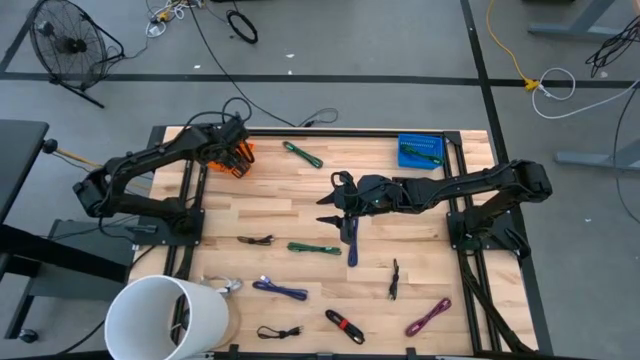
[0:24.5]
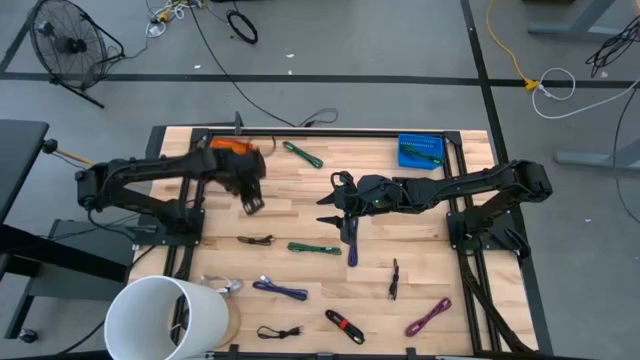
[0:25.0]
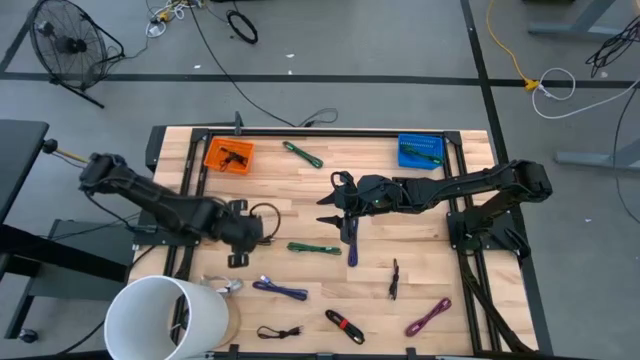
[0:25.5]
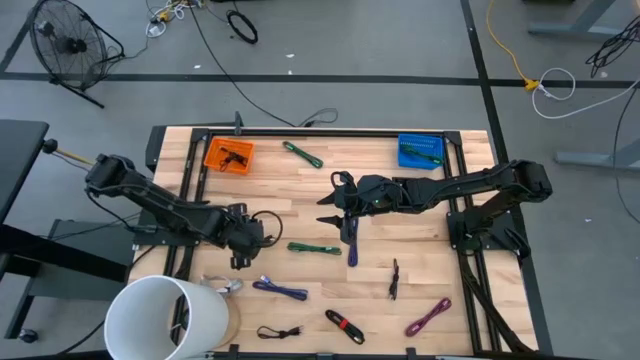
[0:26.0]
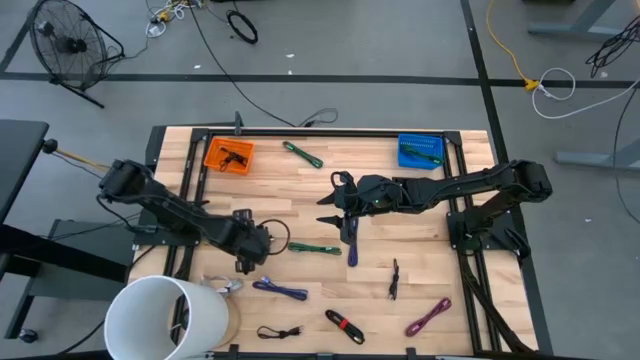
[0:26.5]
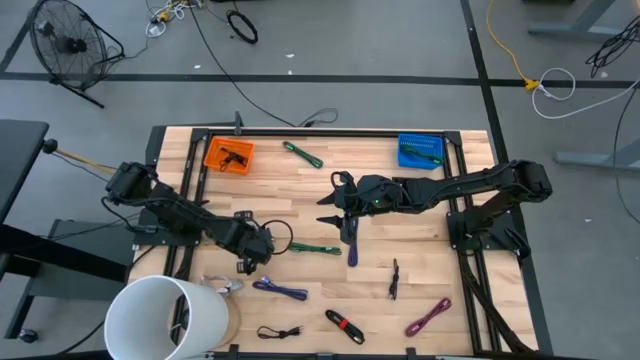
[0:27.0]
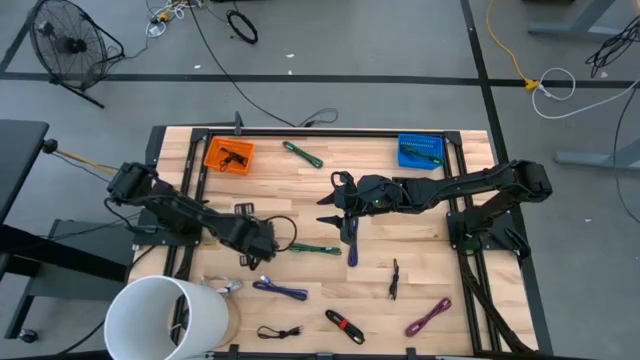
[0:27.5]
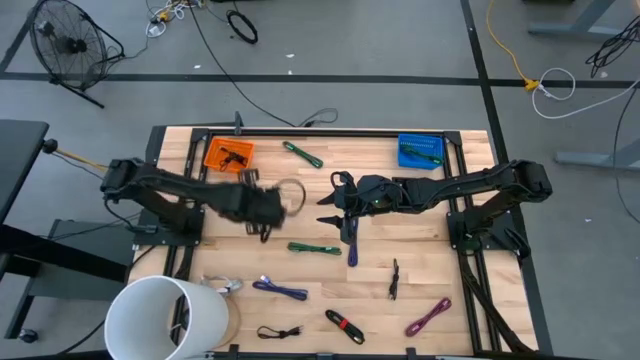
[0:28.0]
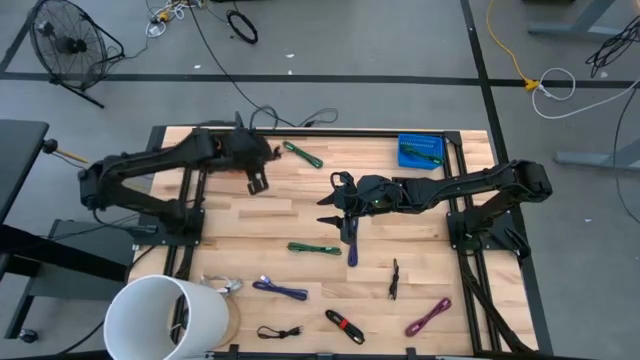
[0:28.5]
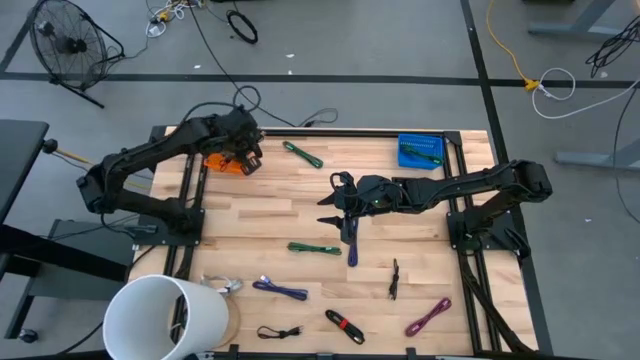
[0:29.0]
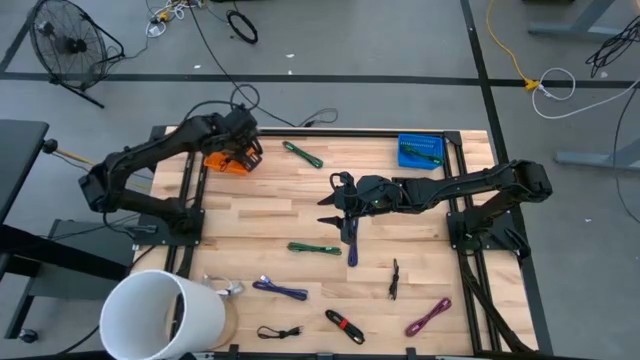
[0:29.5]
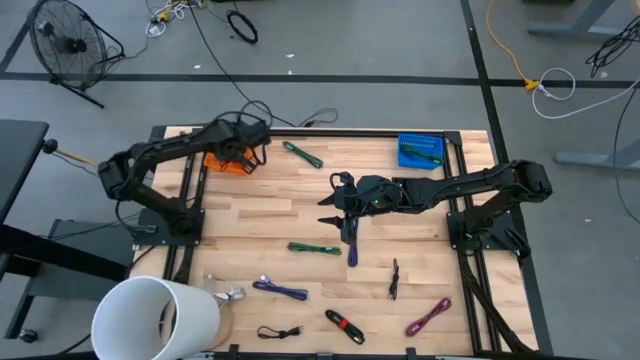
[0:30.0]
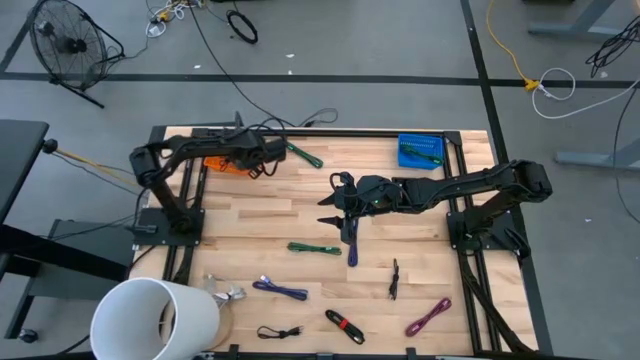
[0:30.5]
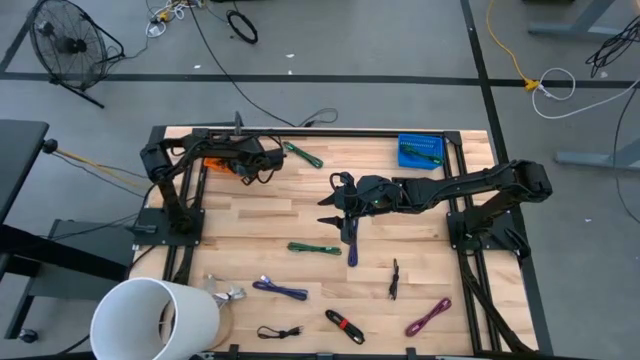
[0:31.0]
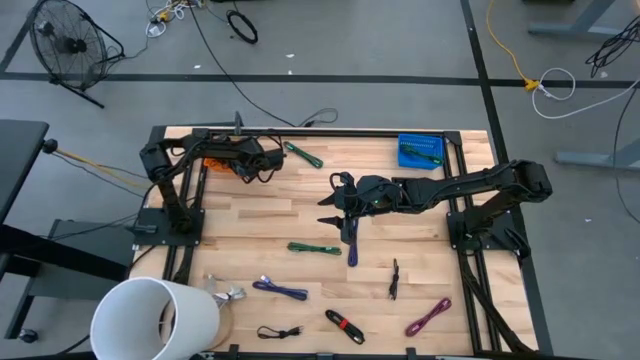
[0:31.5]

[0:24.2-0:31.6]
Task: Pick & Place USB Port
Put the black charger cable into the orange bin

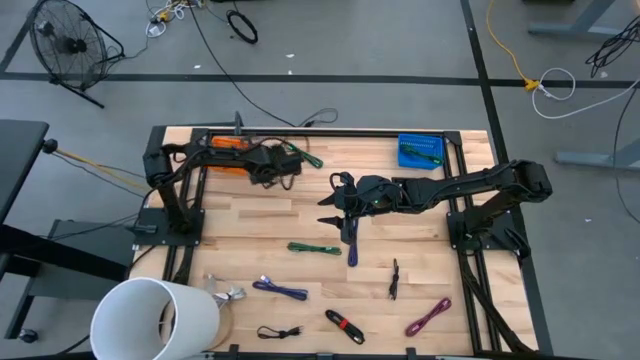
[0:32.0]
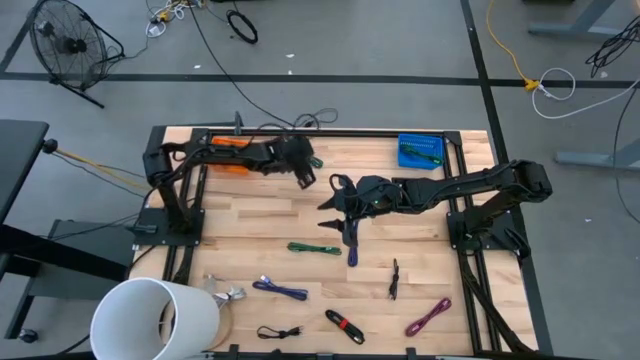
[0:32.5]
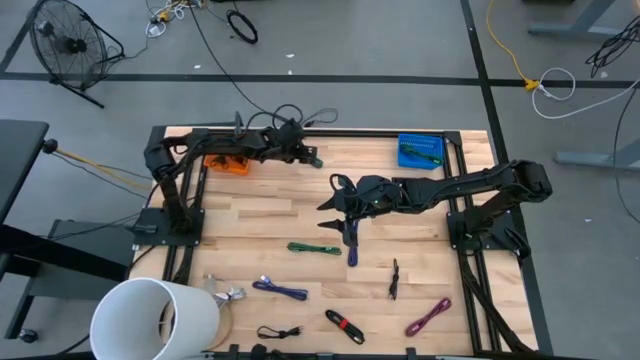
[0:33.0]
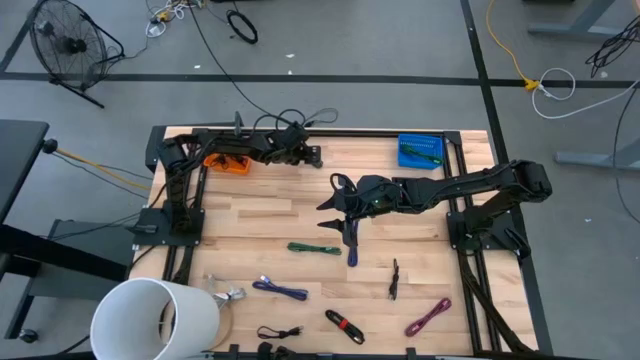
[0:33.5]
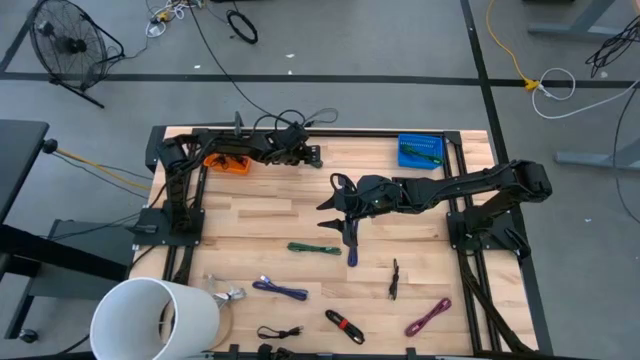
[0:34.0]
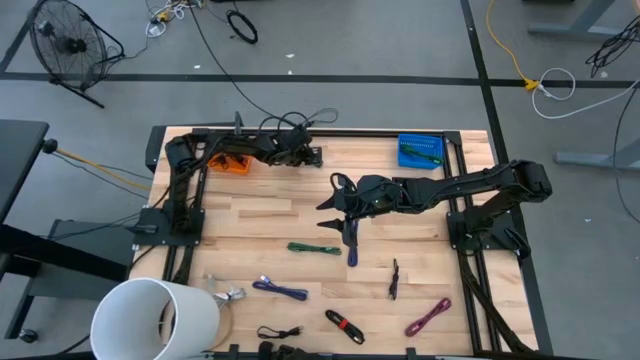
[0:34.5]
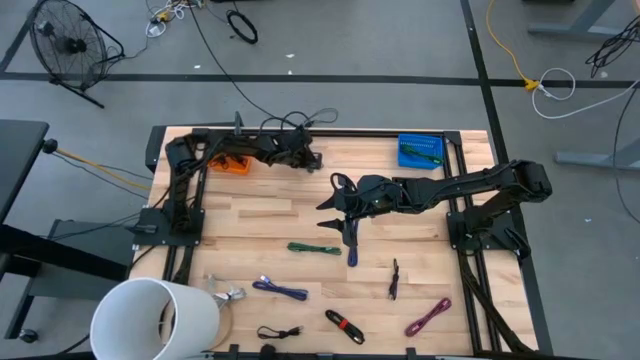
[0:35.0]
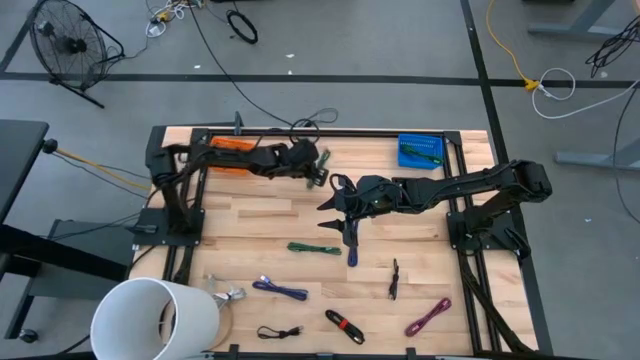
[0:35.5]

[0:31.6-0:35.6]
Put the green charger cable into the blue bin

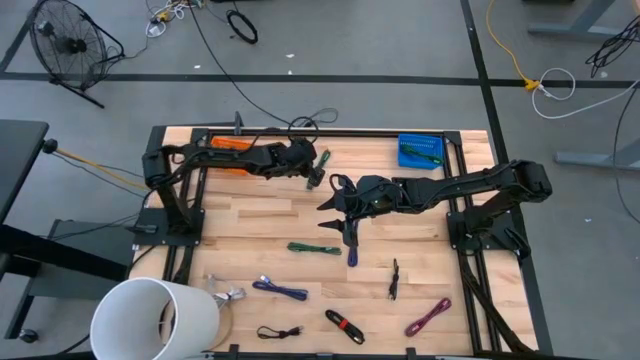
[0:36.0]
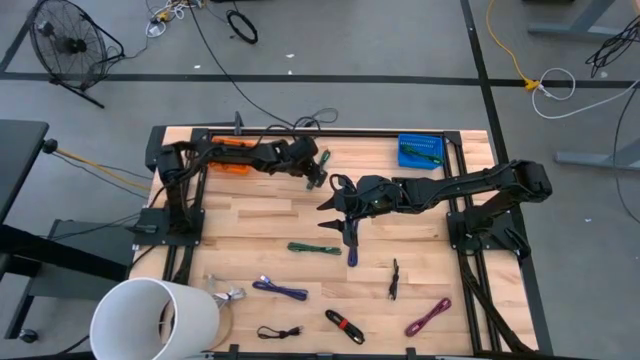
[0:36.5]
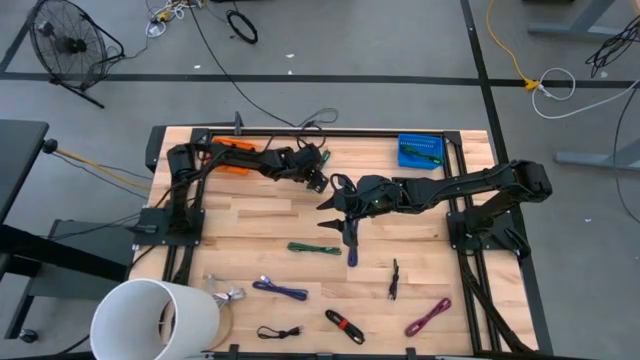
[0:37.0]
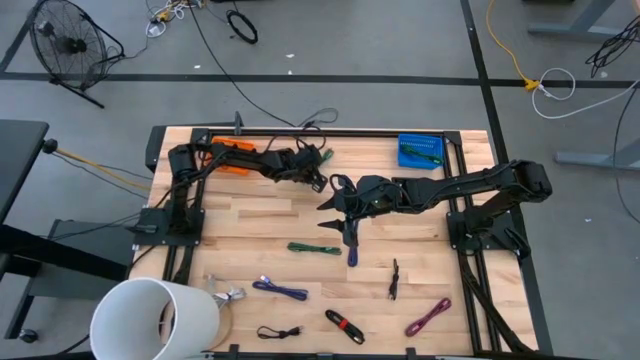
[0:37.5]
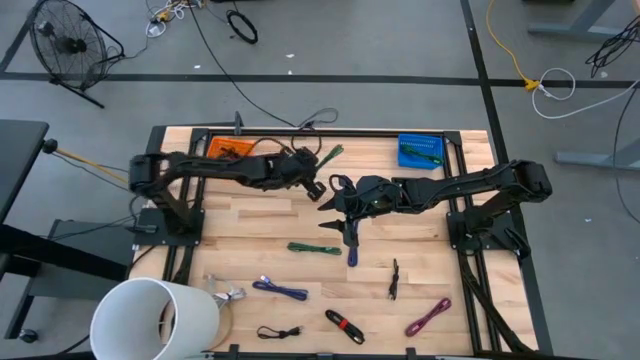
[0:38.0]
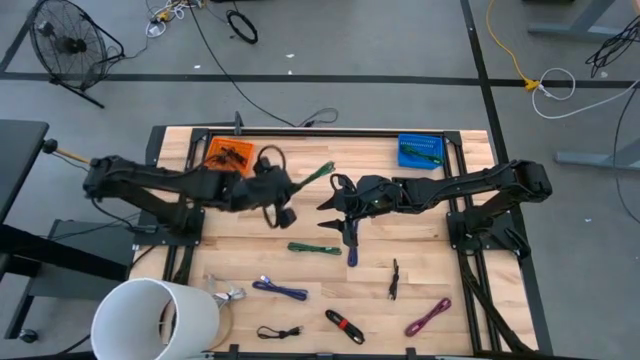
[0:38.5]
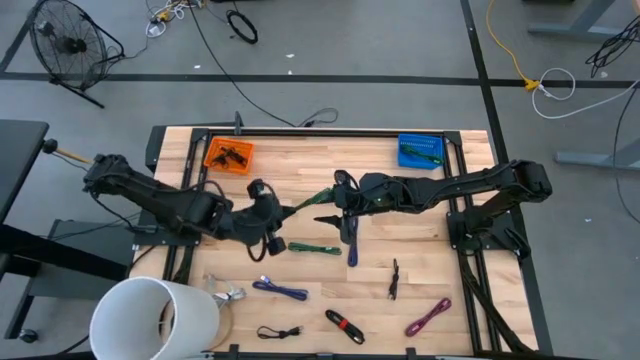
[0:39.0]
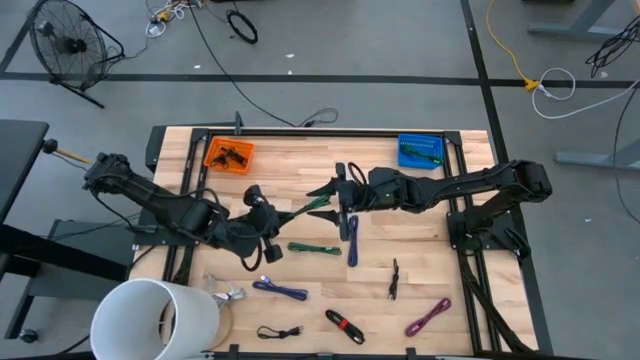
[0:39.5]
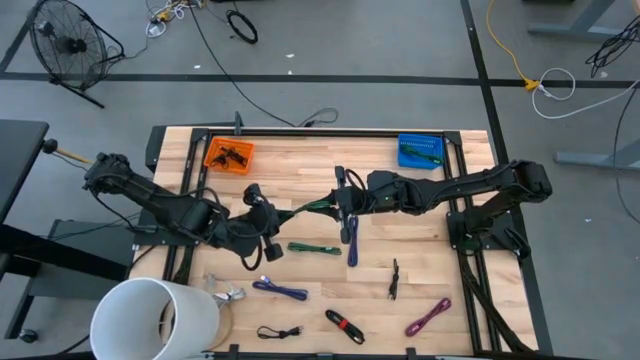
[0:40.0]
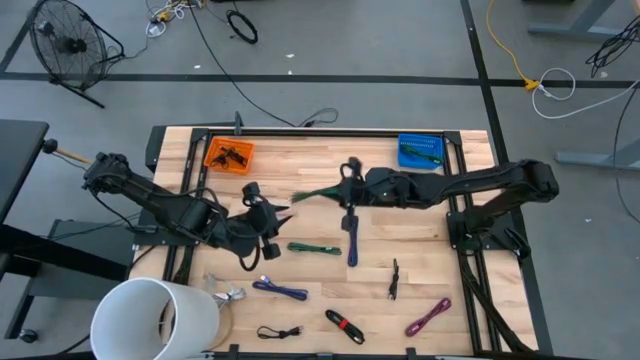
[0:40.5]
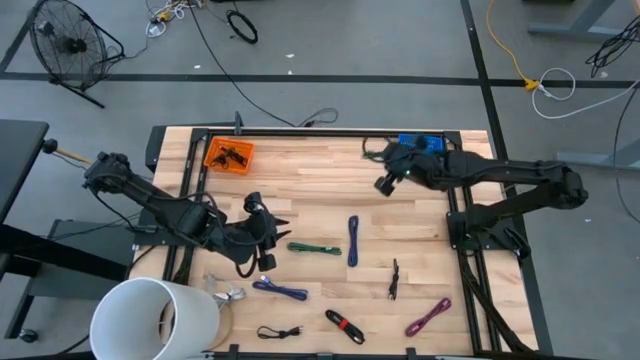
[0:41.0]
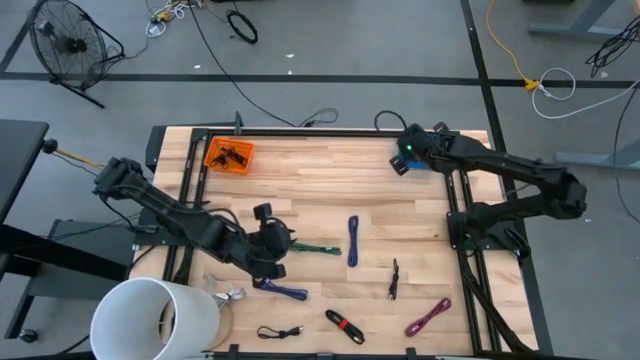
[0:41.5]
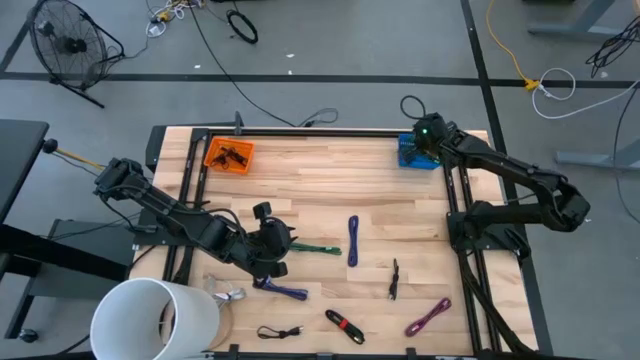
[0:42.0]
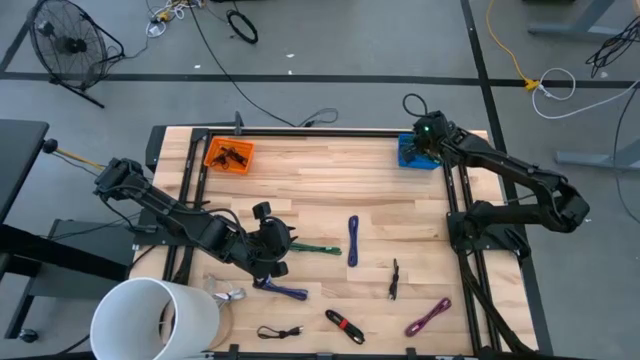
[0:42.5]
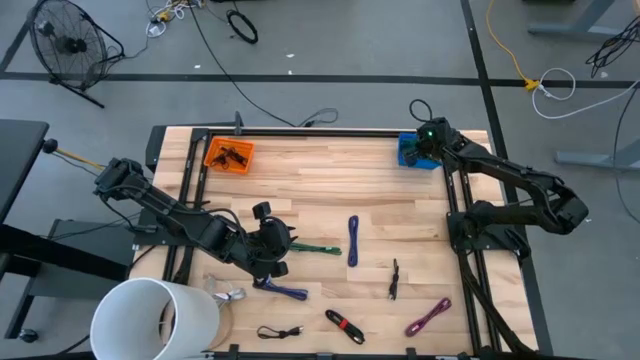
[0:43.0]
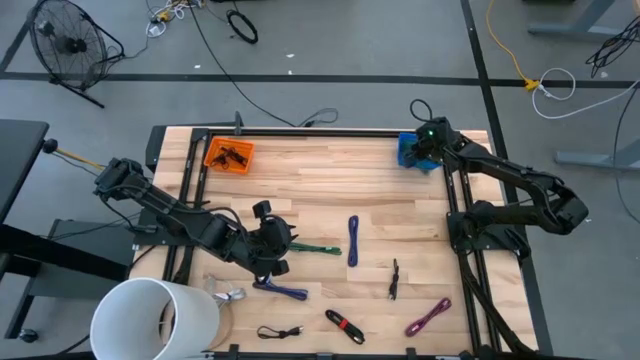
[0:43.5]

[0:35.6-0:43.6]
Put the green charger cable into the blue bin

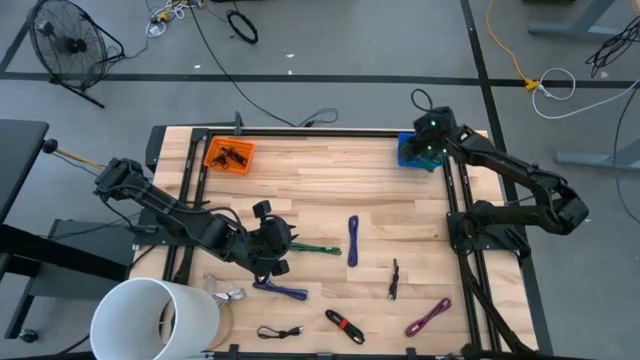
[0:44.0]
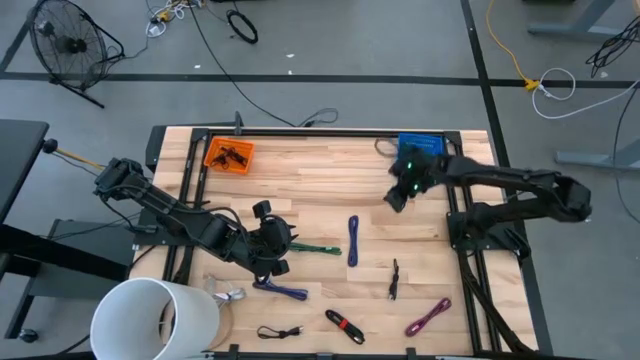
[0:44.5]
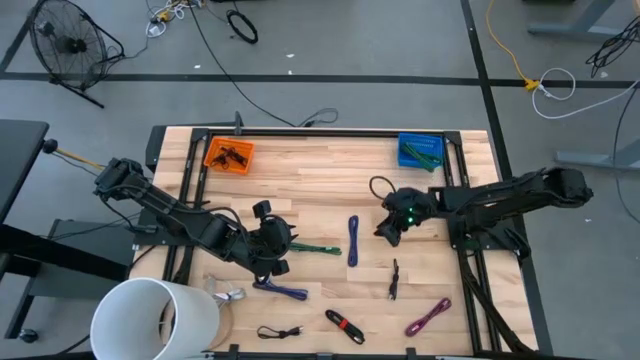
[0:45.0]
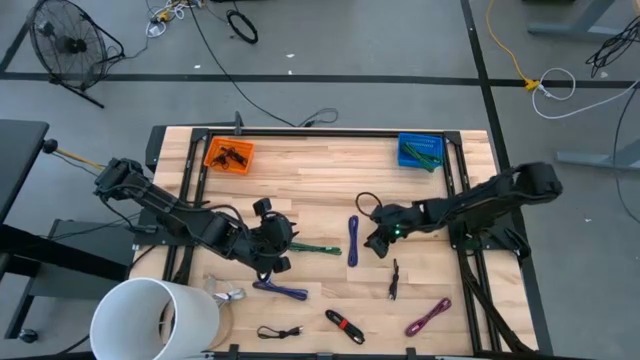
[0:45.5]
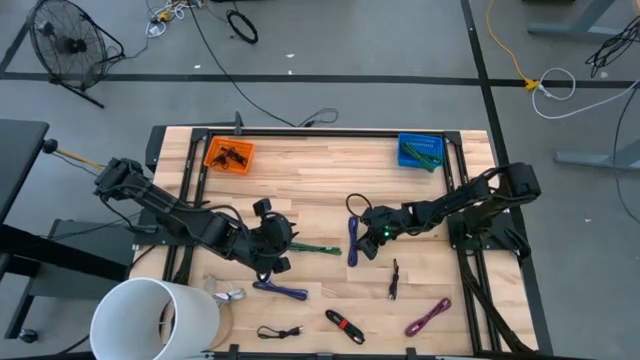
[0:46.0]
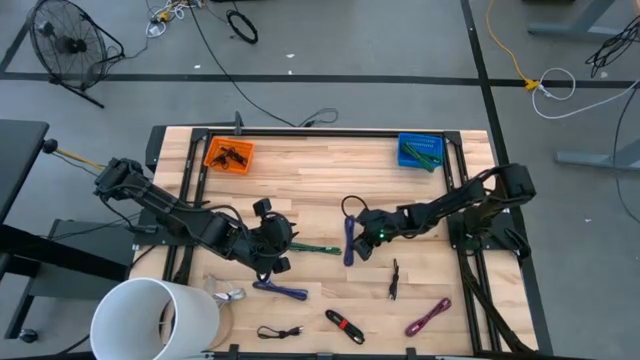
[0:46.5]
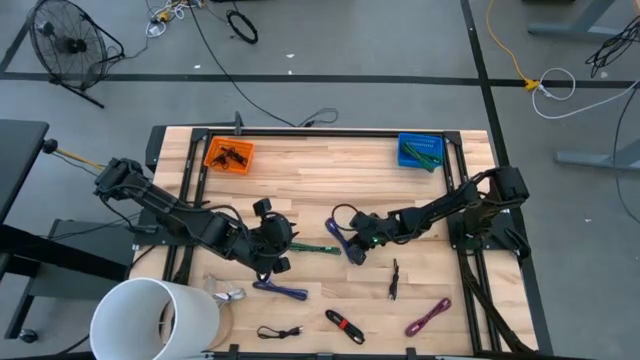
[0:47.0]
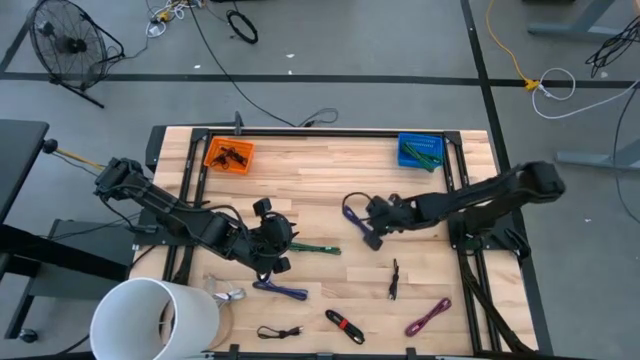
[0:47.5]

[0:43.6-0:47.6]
Put the blue charger cable into the blue bin
